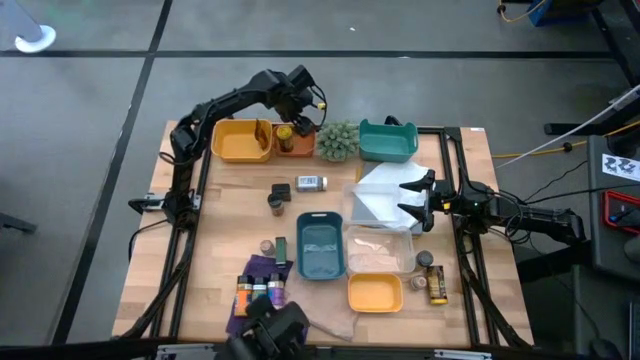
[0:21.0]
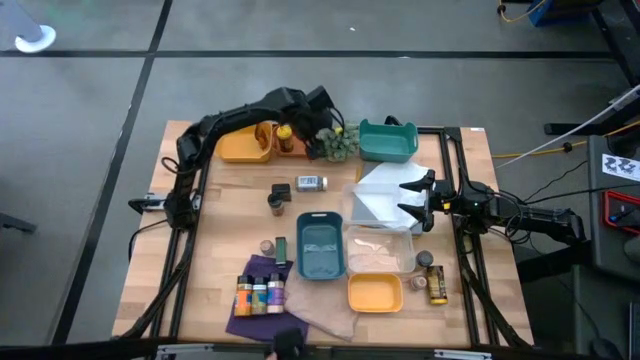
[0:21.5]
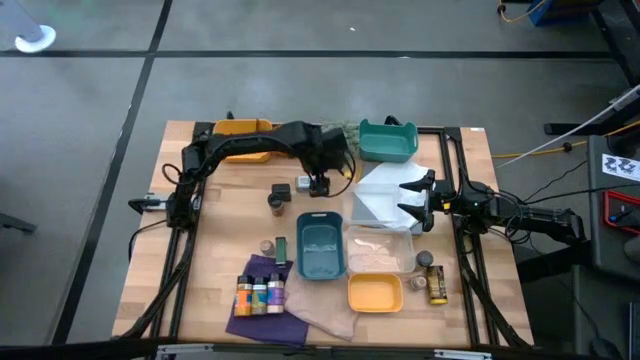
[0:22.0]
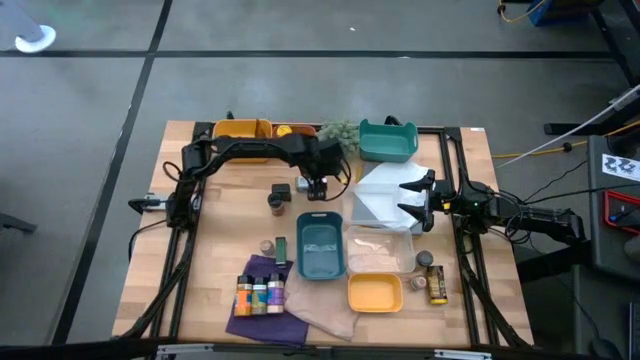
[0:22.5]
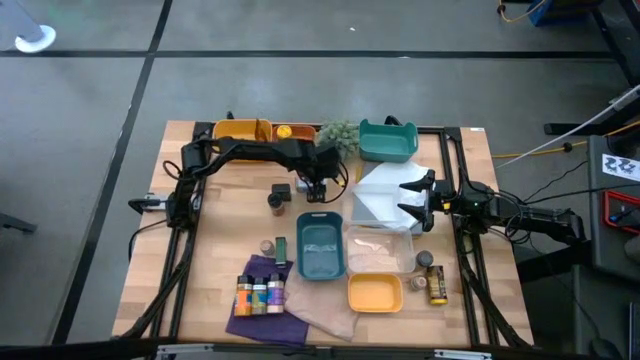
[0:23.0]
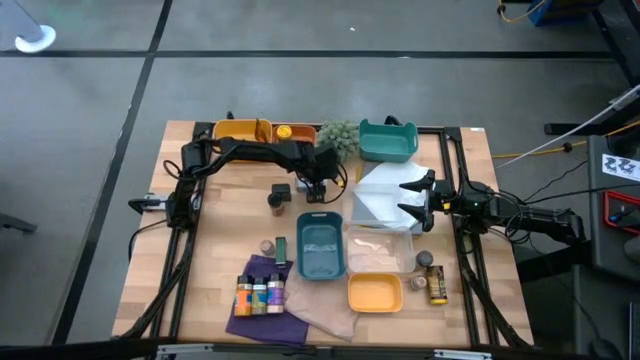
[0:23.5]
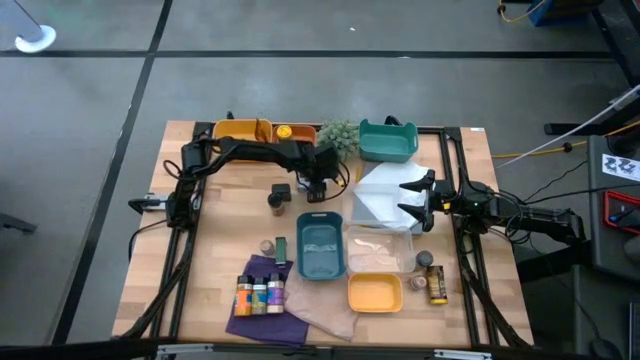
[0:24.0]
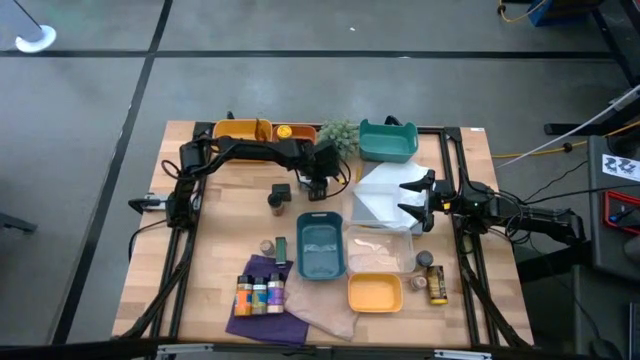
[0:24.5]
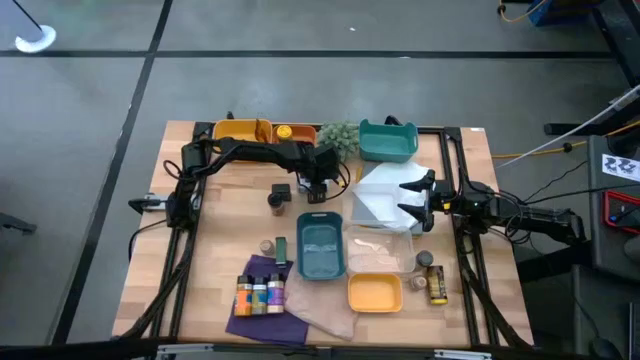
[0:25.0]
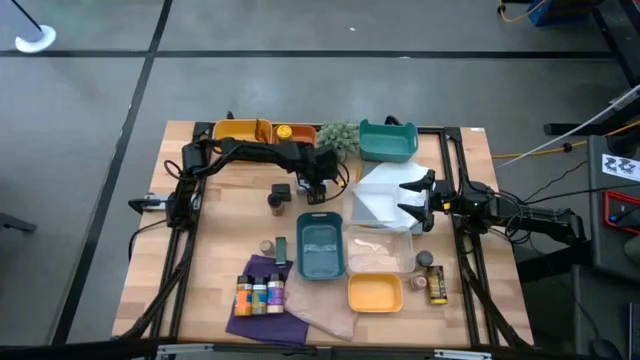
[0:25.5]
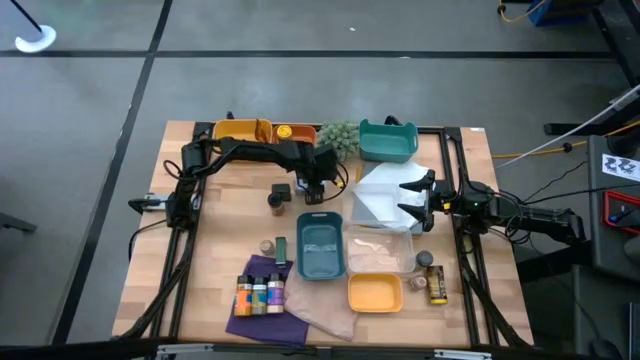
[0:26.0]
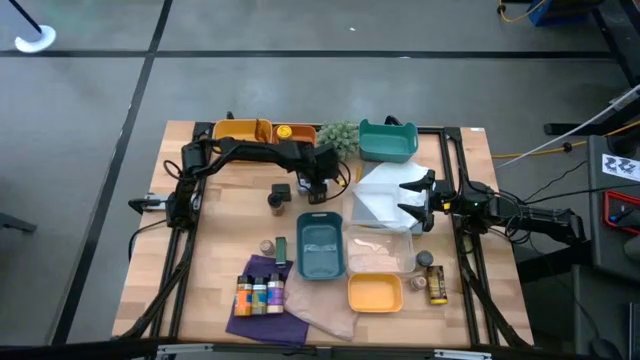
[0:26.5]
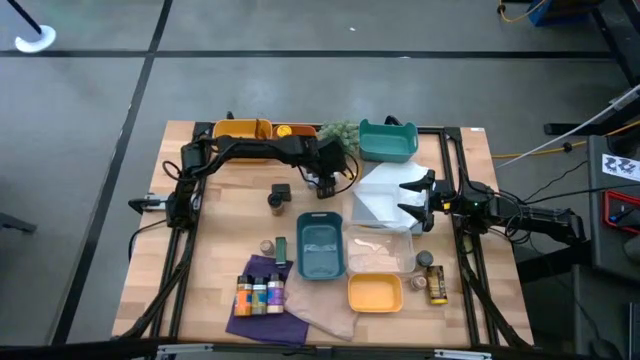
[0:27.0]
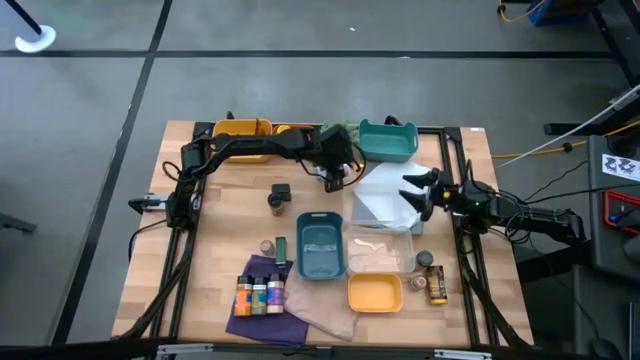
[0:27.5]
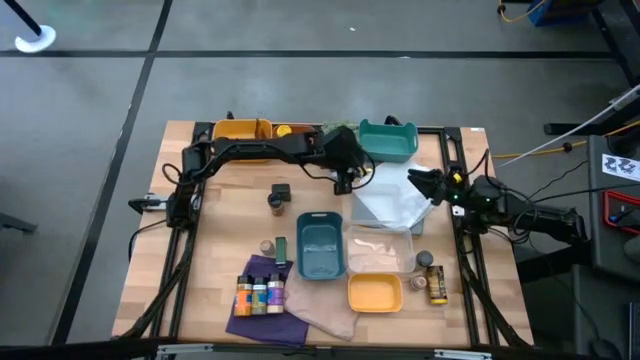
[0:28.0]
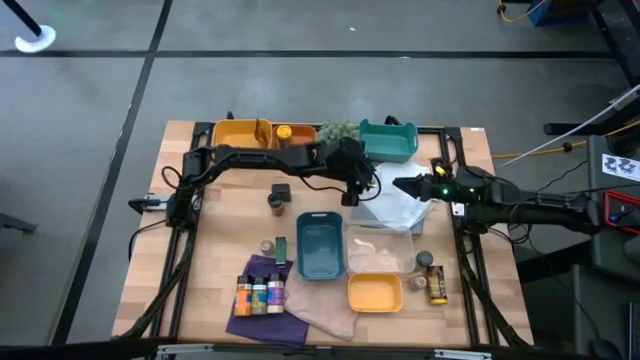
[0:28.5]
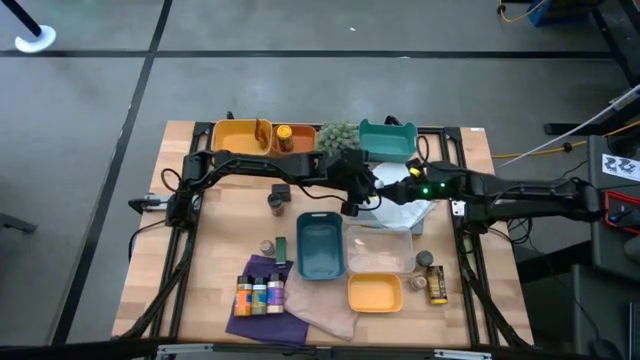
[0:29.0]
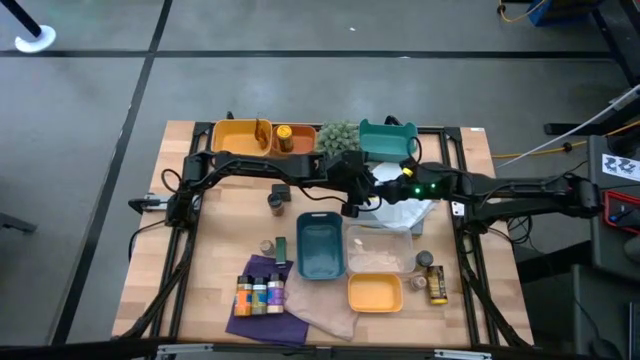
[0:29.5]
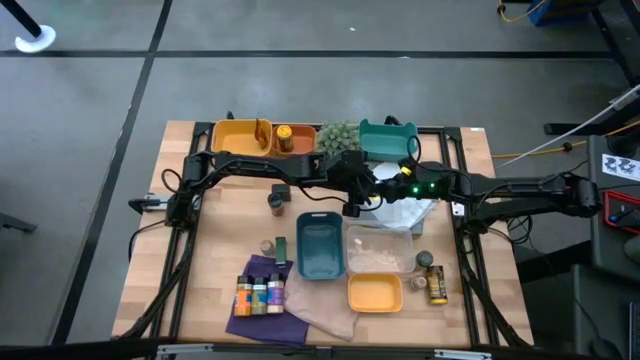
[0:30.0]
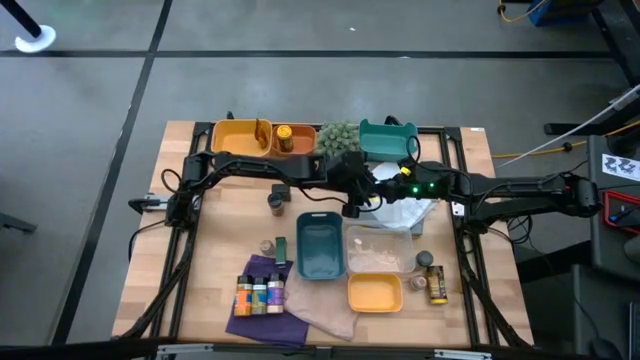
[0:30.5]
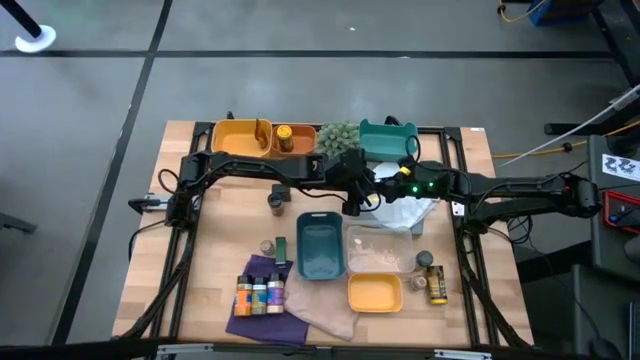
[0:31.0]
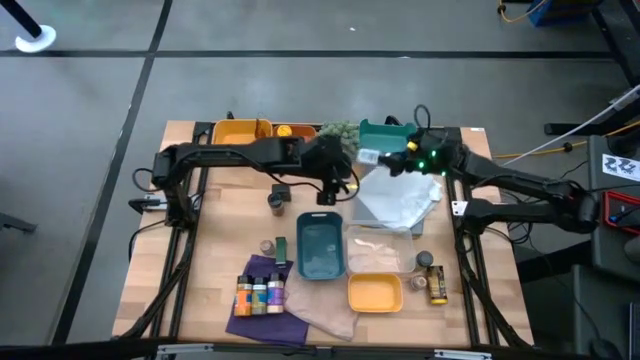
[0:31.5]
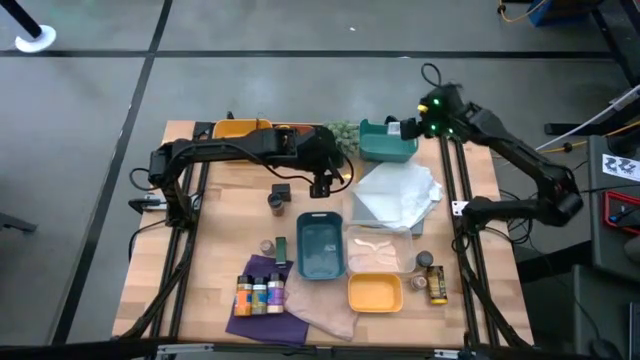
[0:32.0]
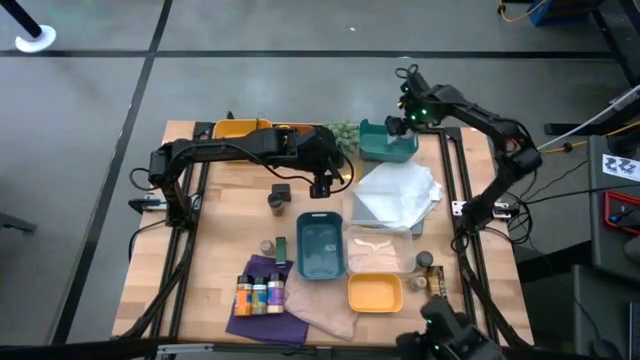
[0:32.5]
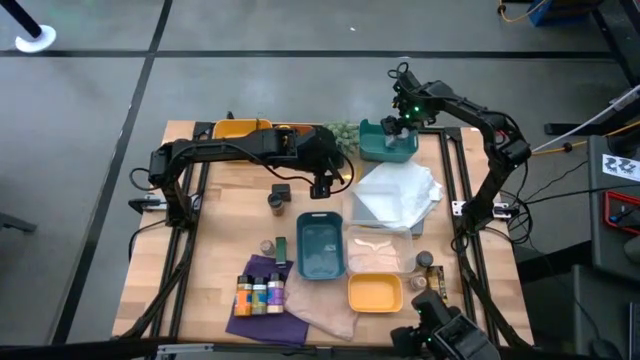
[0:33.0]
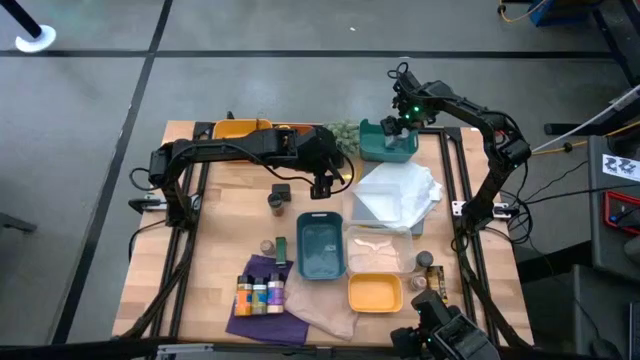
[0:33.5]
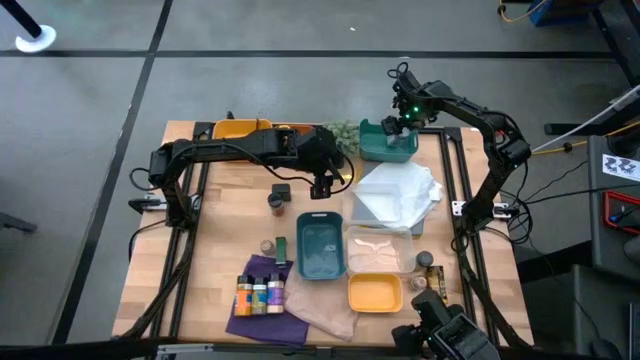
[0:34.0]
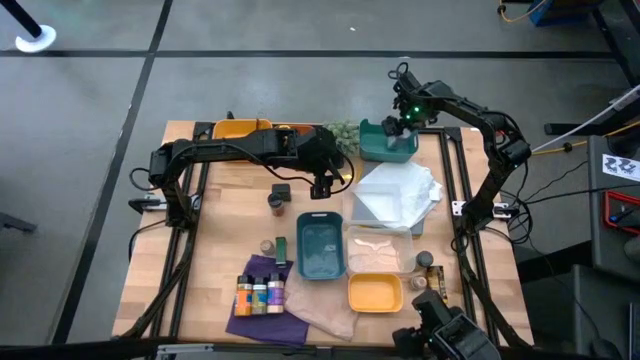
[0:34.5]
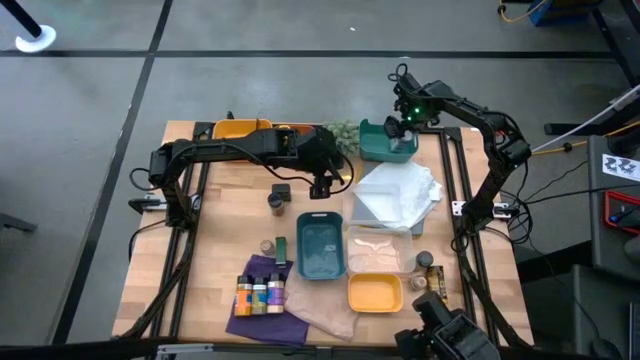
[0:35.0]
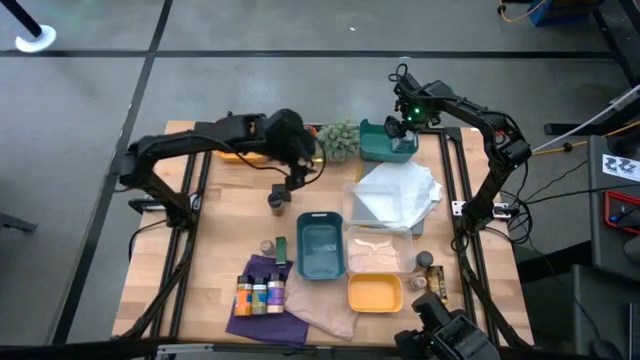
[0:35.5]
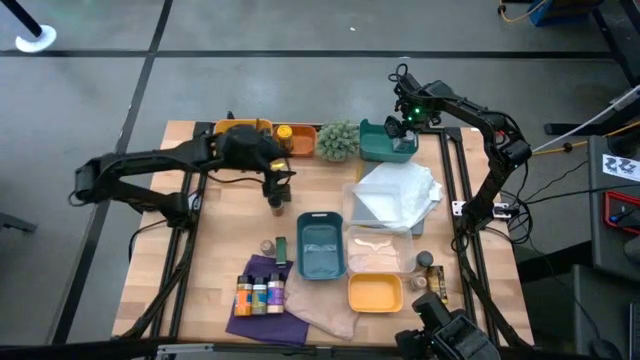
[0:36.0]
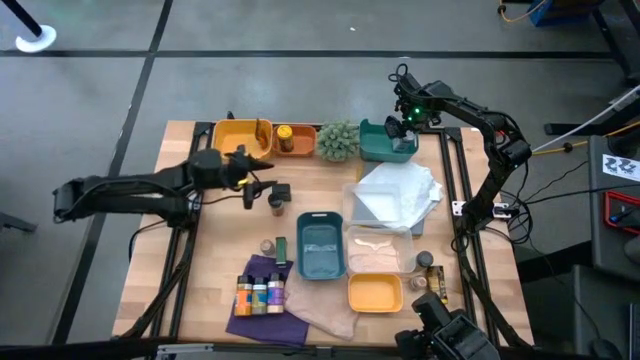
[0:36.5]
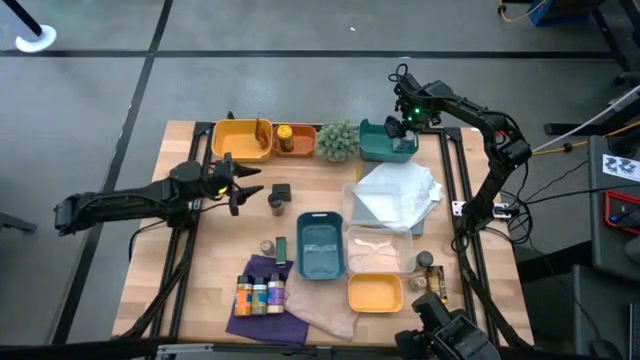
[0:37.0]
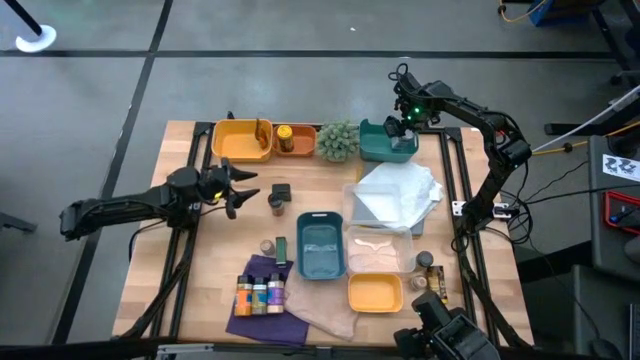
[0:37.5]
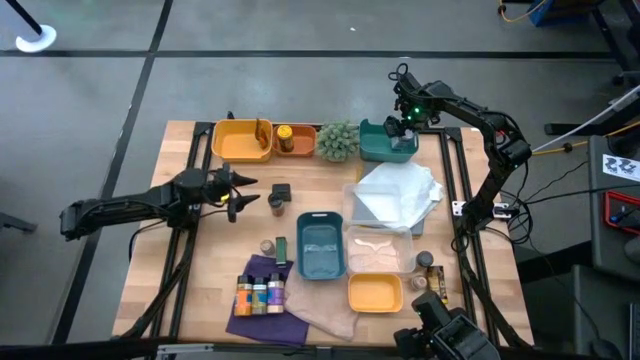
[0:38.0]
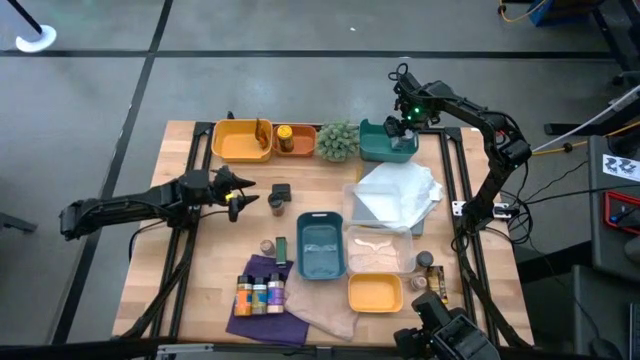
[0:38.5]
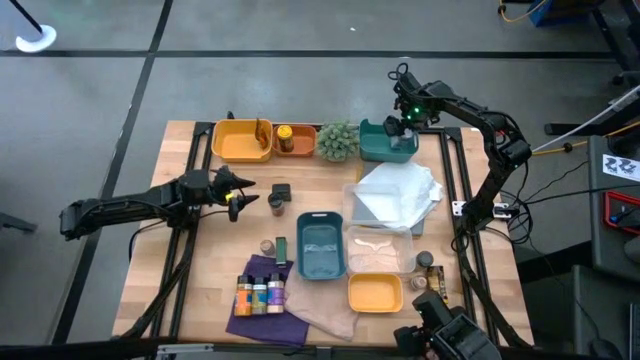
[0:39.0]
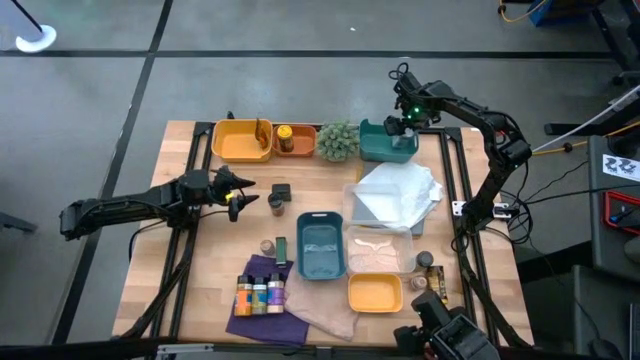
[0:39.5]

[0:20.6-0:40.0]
Task: Sort spices by type
Put the white seasoning bottle into the green bin
